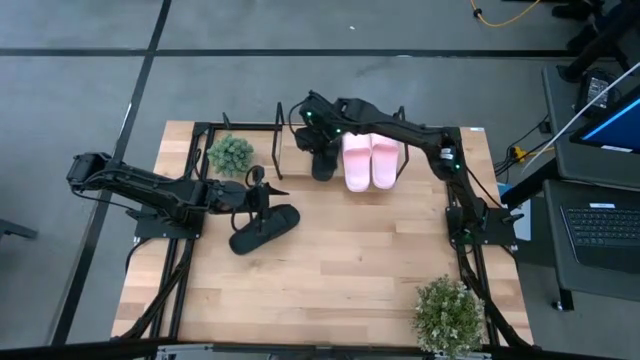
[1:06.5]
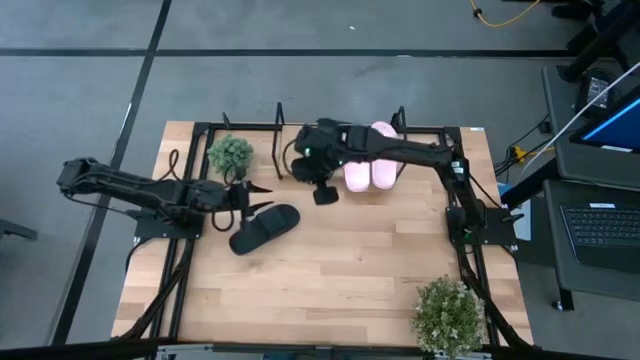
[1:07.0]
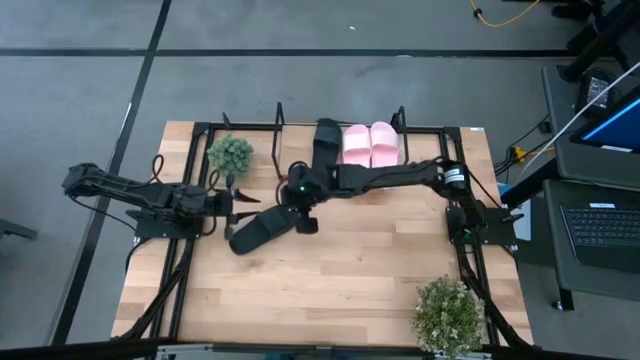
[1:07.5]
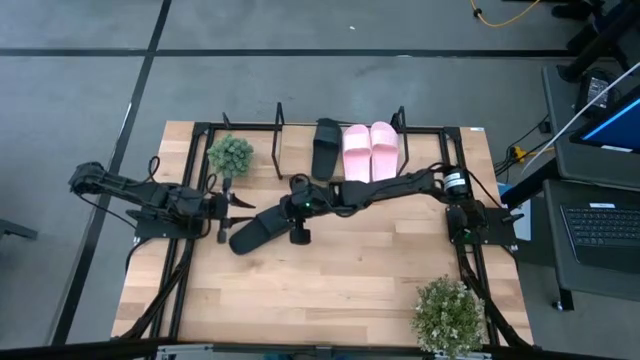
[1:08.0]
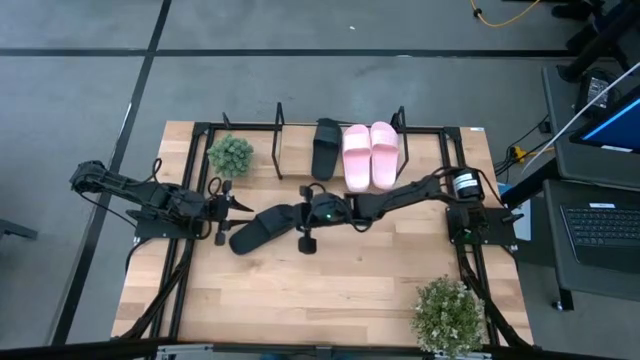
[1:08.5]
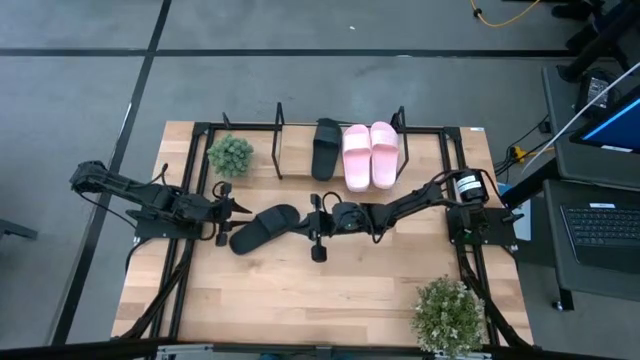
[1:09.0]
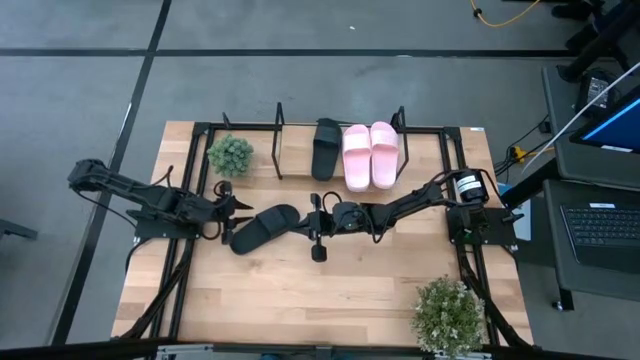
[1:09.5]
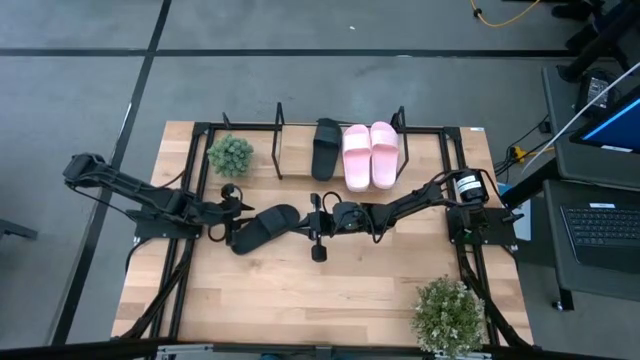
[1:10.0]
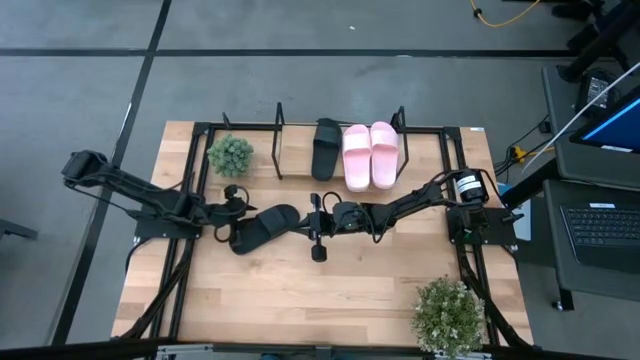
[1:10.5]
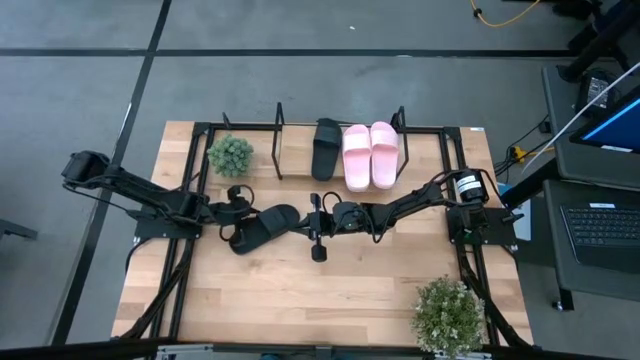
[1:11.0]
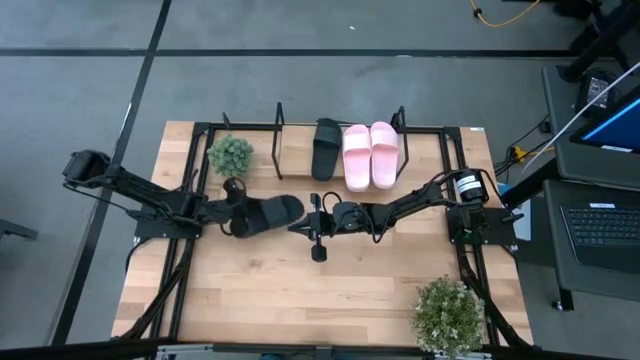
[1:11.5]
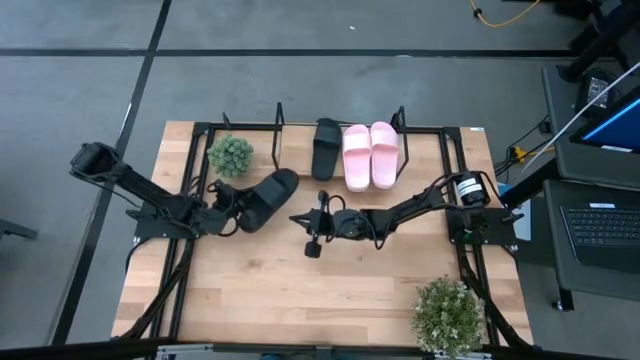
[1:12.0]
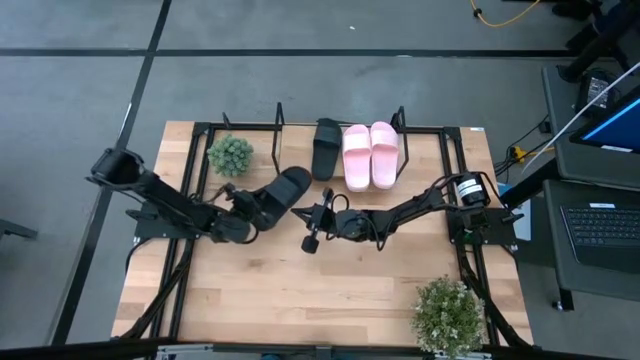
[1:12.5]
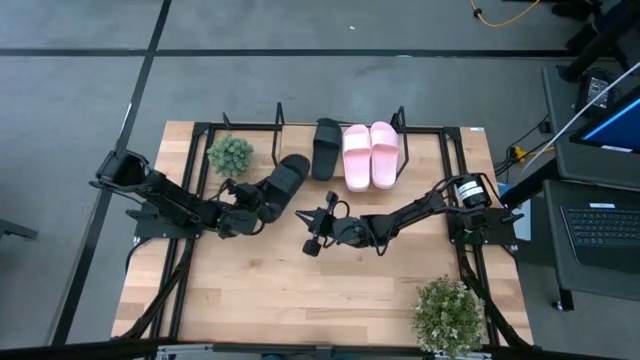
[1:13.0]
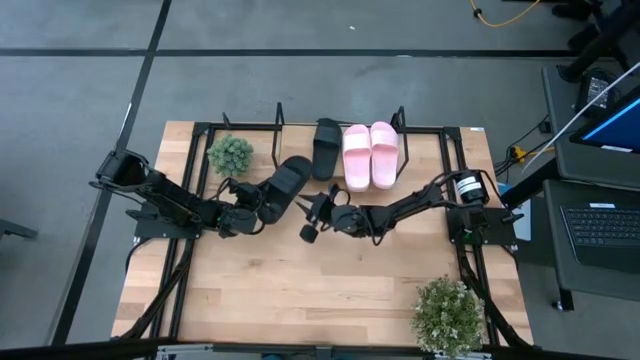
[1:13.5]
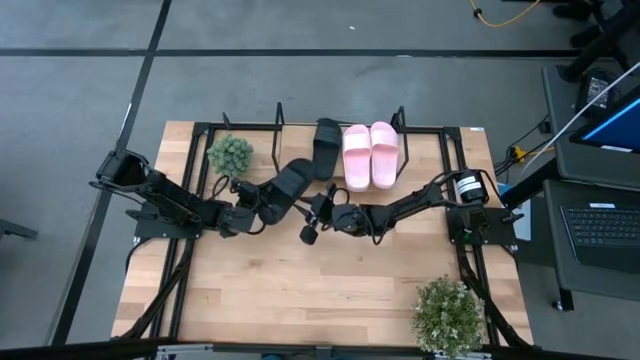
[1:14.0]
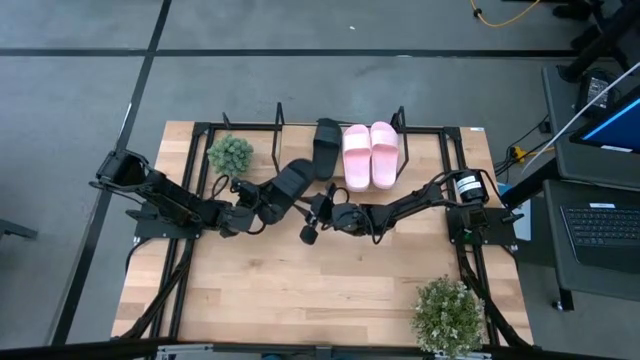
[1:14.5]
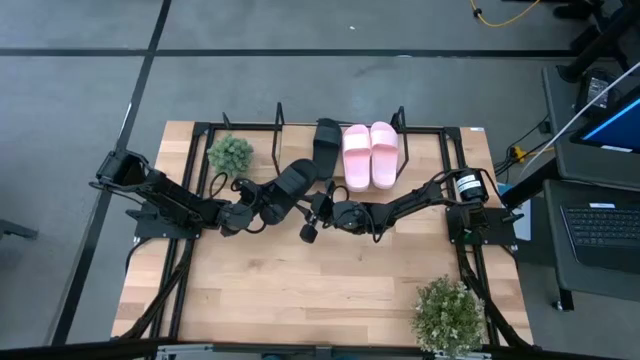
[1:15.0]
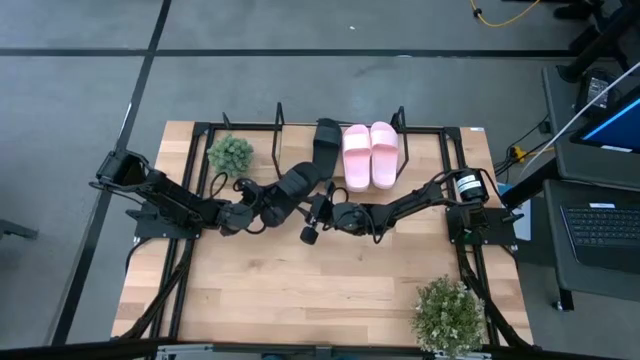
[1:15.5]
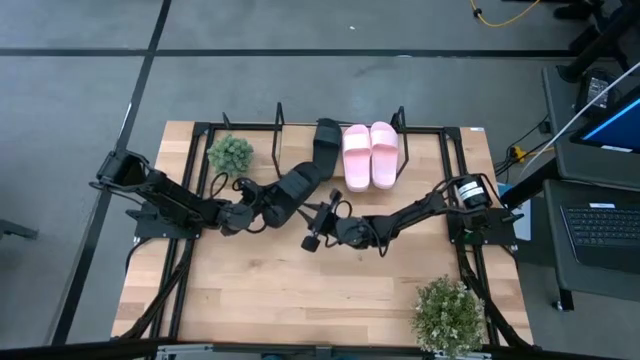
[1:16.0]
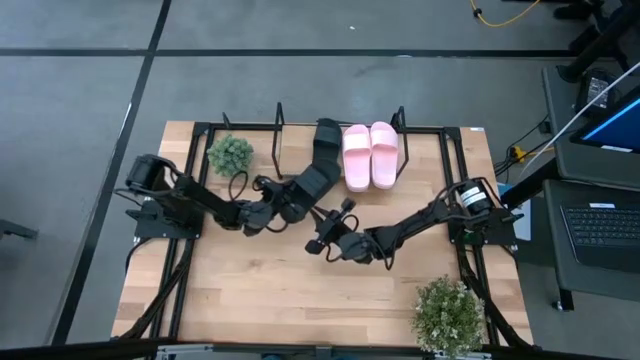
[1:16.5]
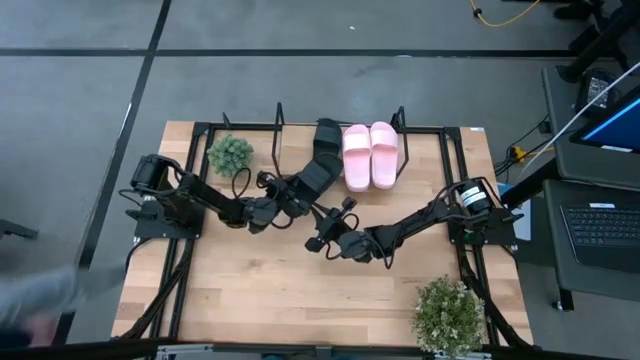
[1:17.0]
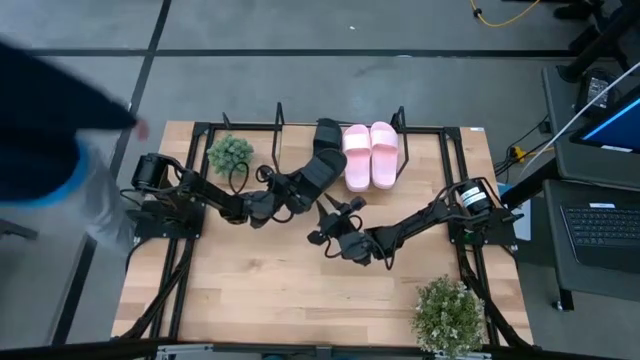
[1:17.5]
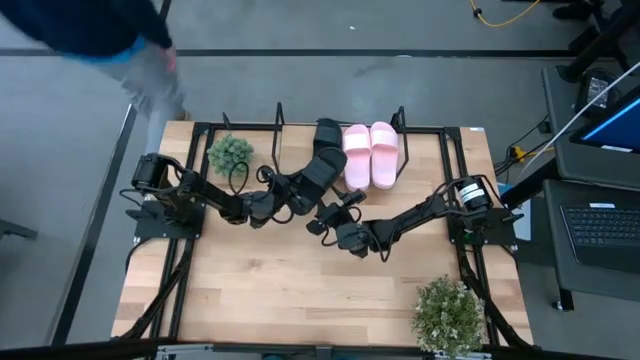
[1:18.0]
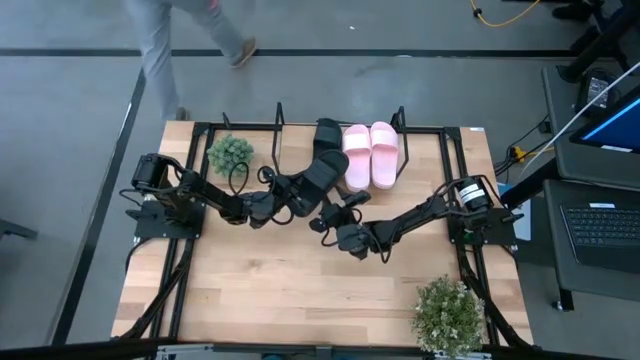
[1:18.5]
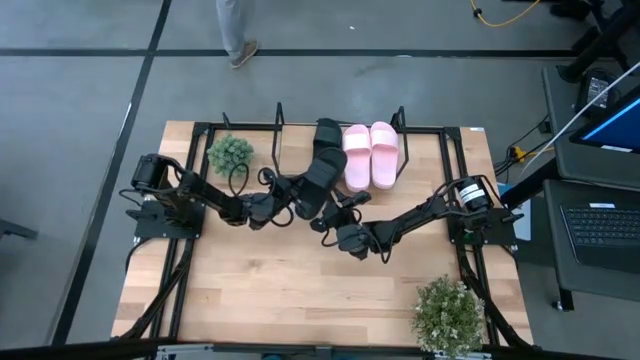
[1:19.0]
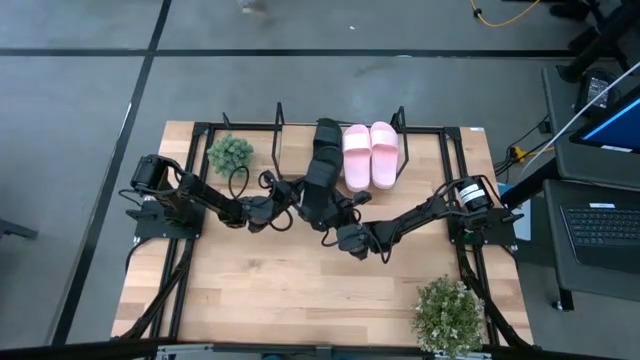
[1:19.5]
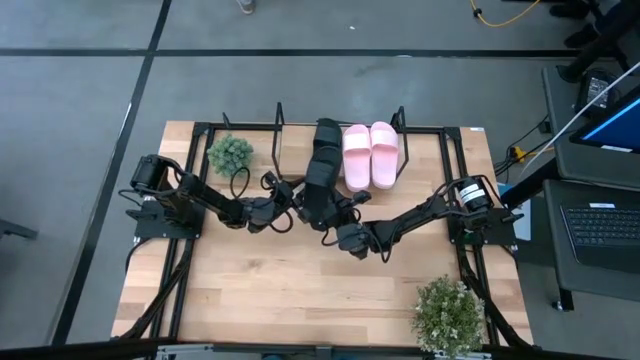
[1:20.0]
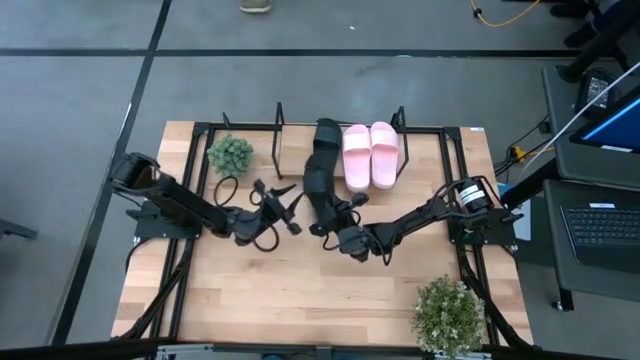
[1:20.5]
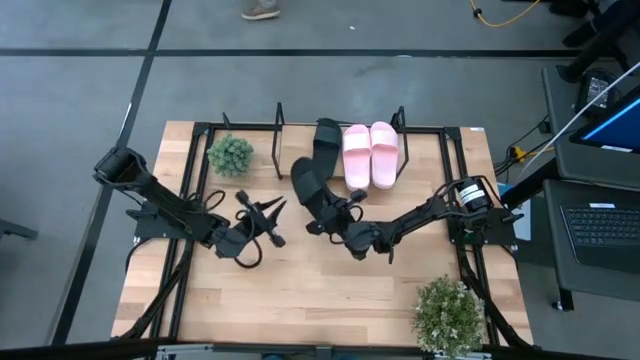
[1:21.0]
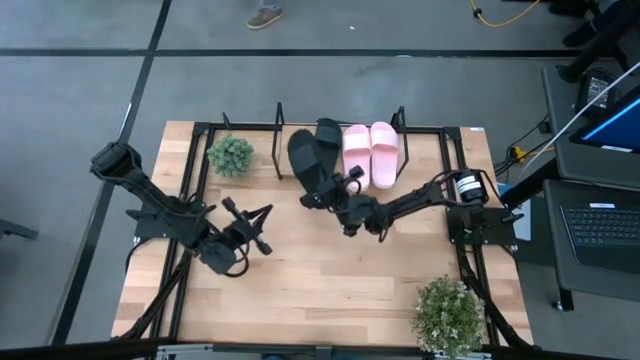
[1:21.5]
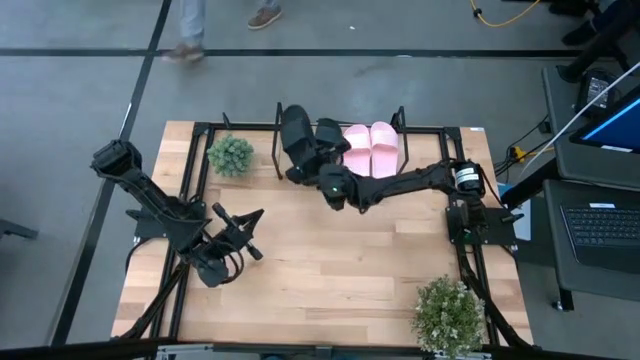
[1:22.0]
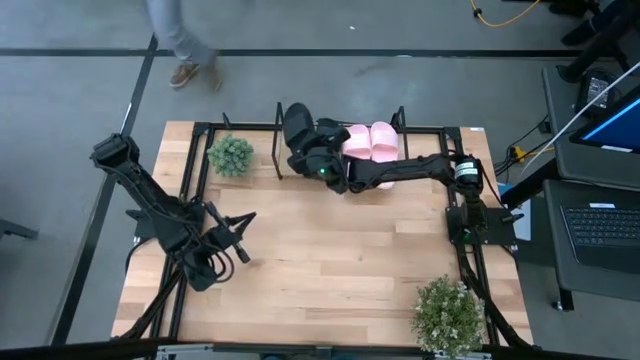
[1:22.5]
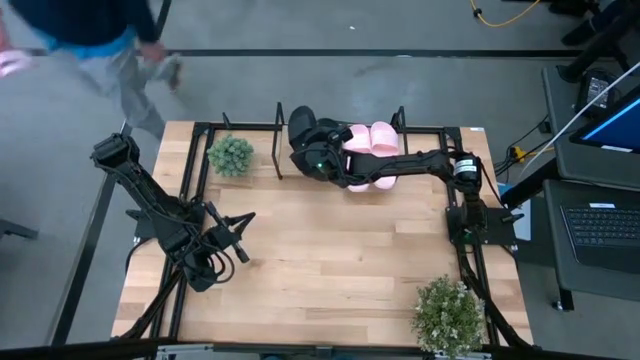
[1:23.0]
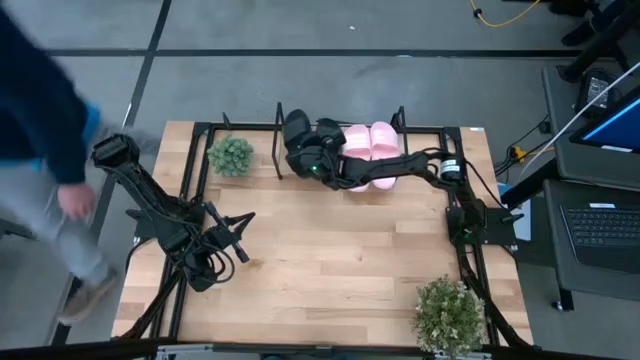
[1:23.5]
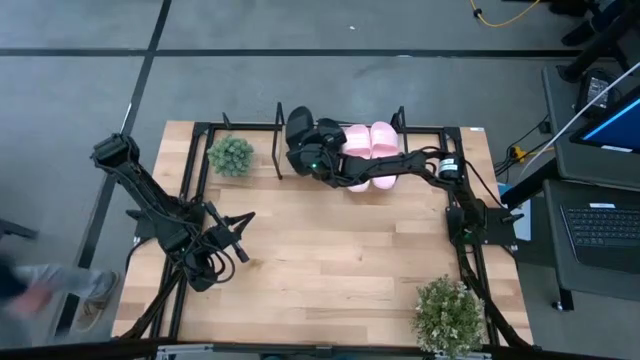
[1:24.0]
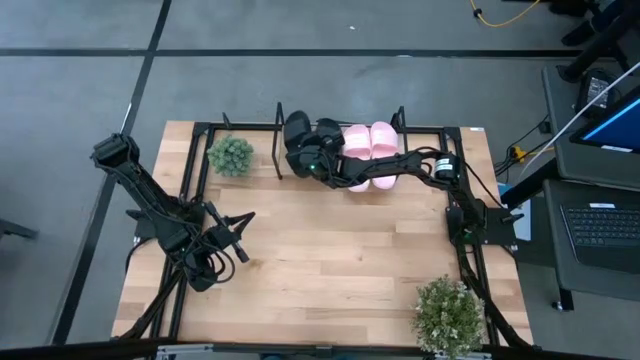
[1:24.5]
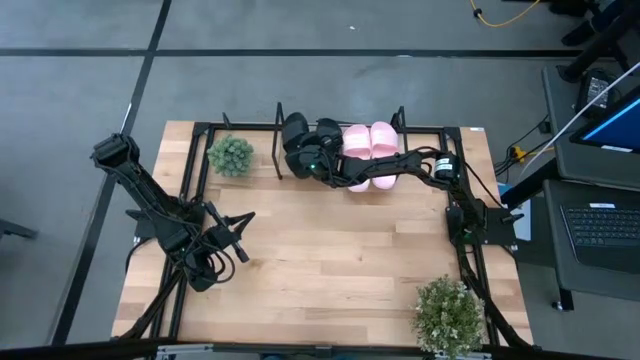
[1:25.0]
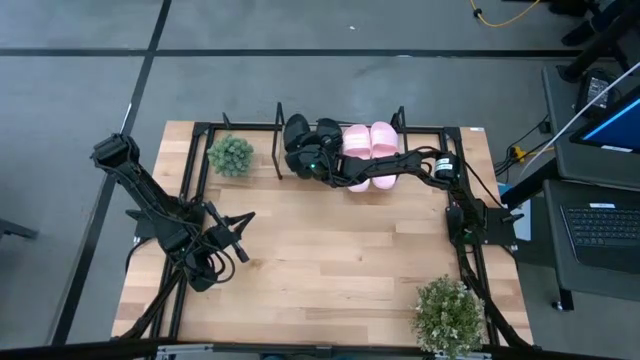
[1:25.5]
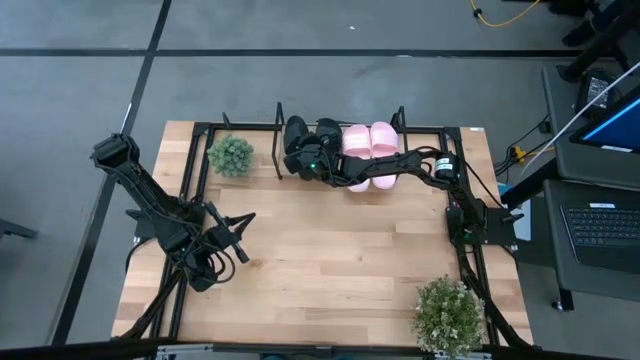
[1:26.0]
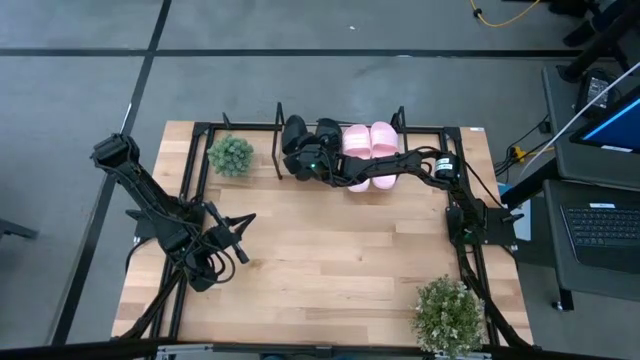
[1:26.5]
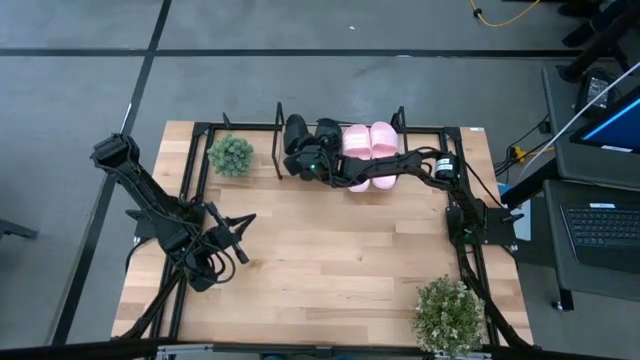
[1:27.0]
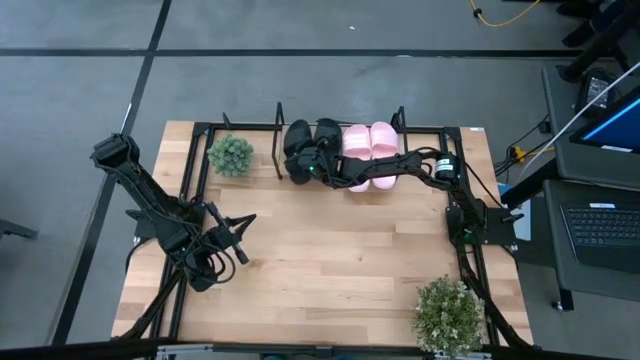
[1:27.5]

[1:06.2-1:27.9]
Task: Pick and place slides into the shelf
Put the black slides on the shelf
